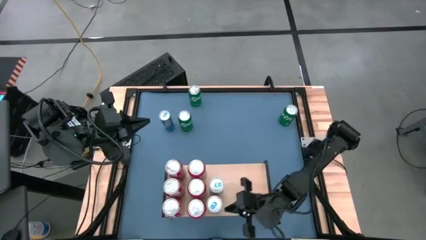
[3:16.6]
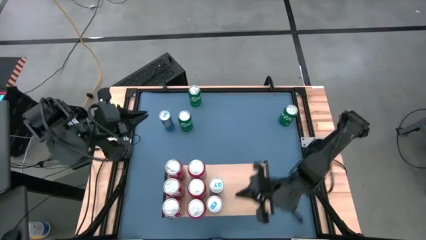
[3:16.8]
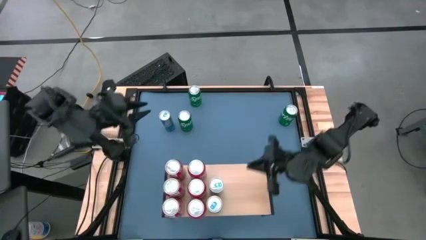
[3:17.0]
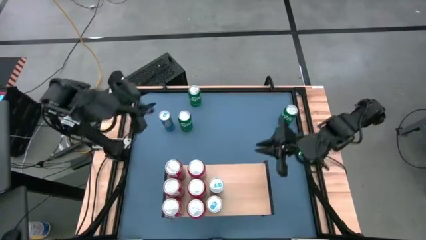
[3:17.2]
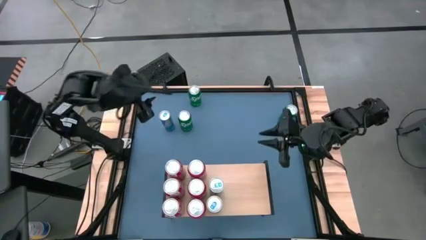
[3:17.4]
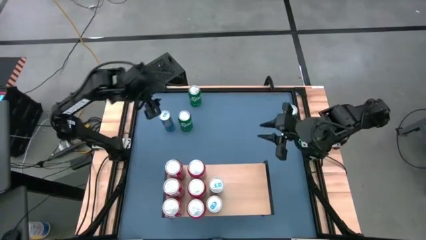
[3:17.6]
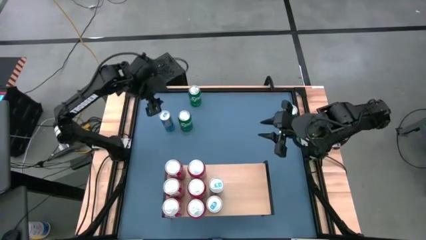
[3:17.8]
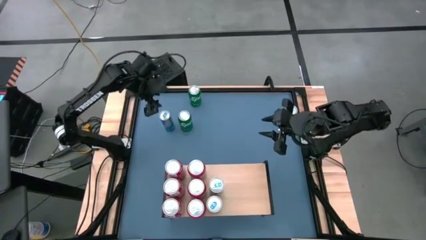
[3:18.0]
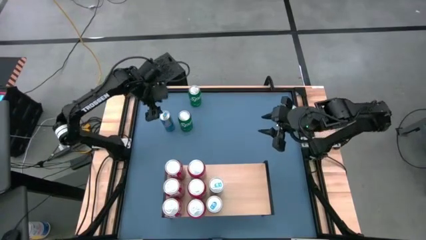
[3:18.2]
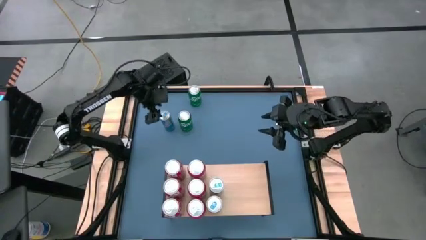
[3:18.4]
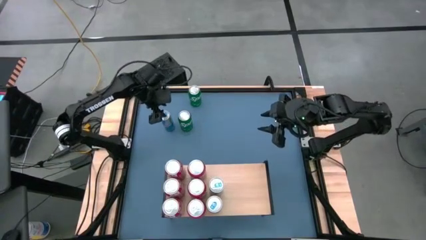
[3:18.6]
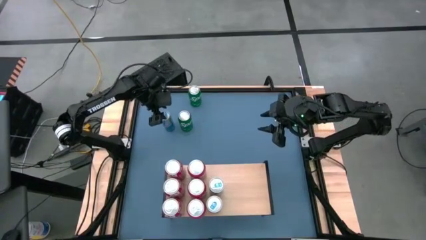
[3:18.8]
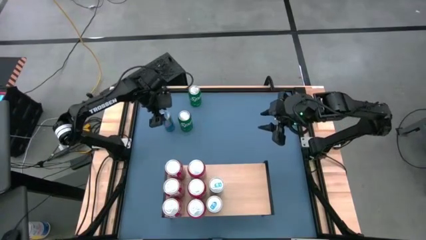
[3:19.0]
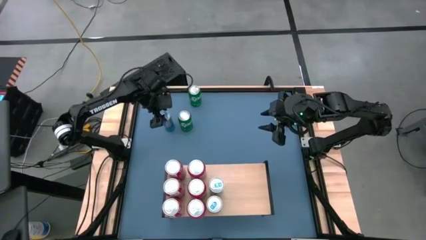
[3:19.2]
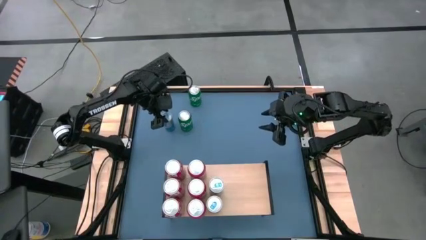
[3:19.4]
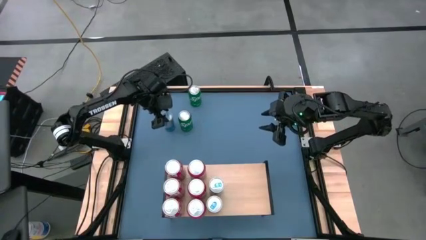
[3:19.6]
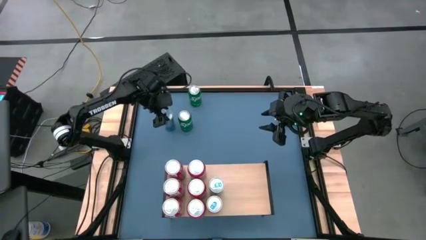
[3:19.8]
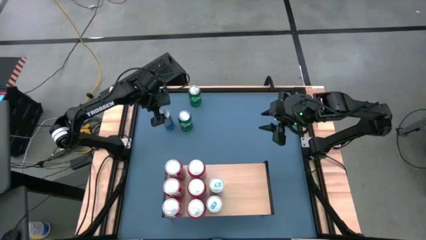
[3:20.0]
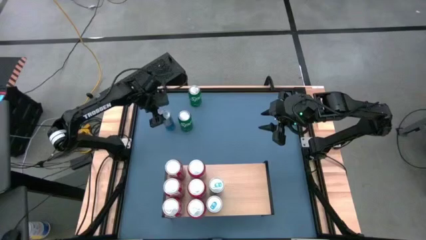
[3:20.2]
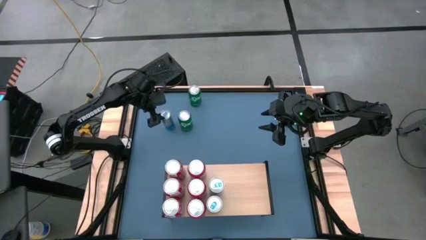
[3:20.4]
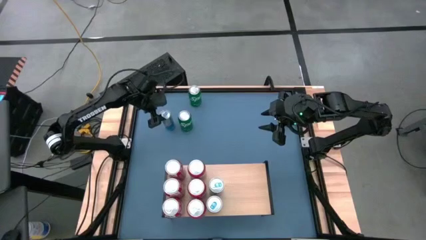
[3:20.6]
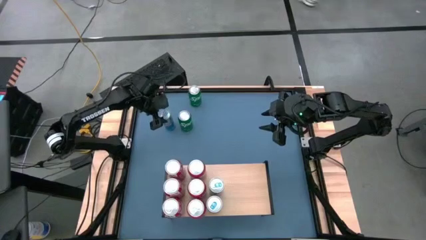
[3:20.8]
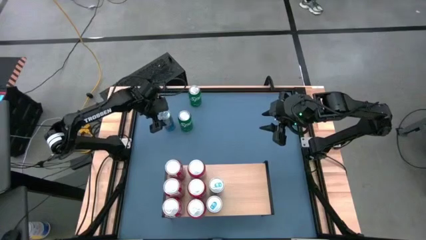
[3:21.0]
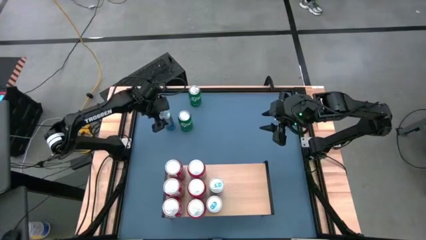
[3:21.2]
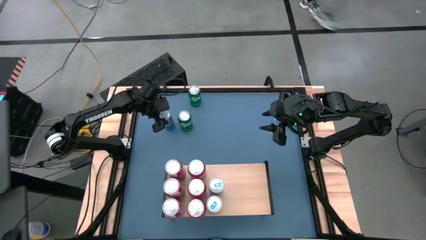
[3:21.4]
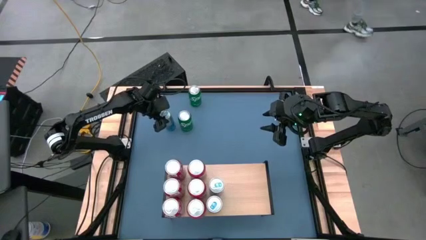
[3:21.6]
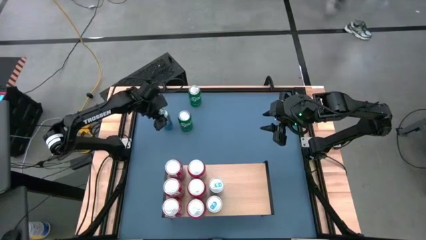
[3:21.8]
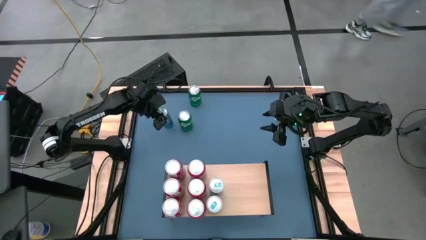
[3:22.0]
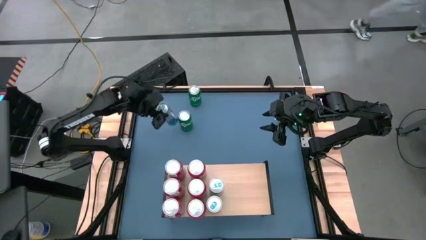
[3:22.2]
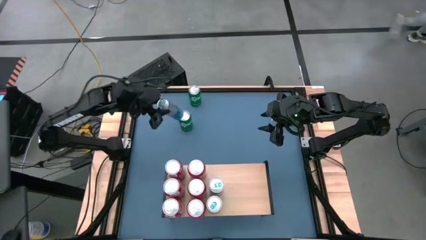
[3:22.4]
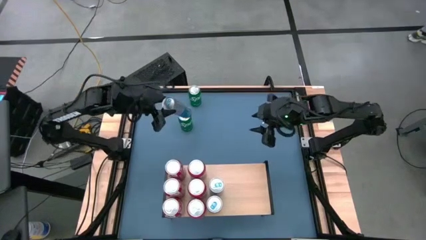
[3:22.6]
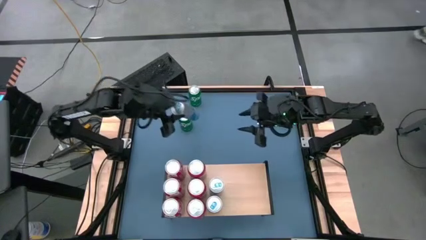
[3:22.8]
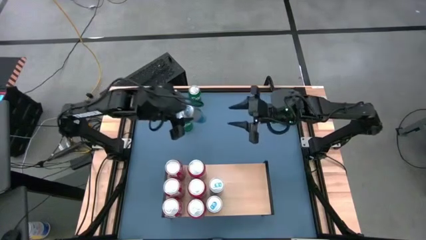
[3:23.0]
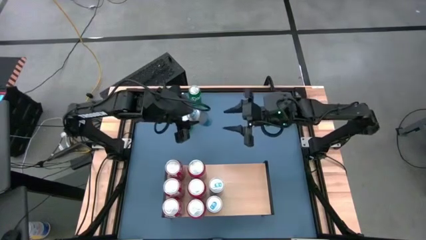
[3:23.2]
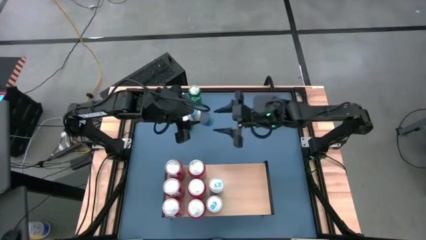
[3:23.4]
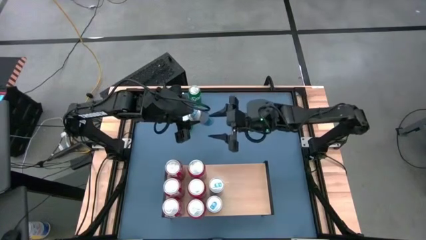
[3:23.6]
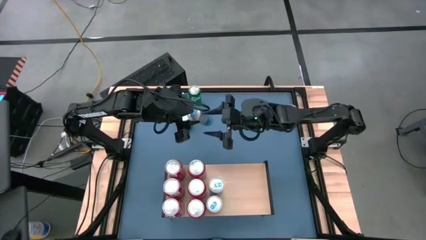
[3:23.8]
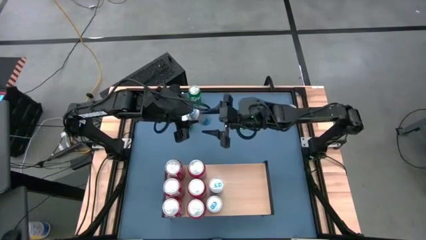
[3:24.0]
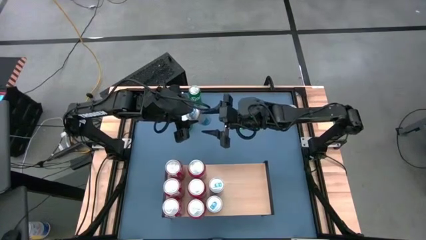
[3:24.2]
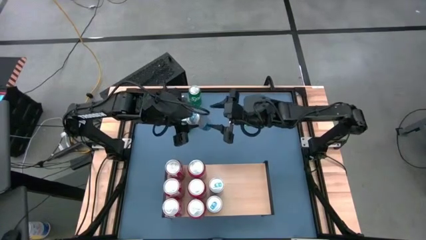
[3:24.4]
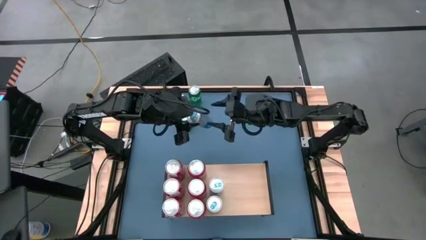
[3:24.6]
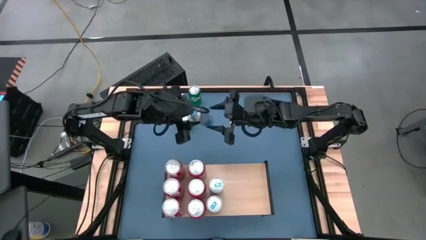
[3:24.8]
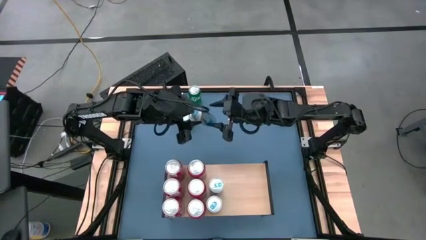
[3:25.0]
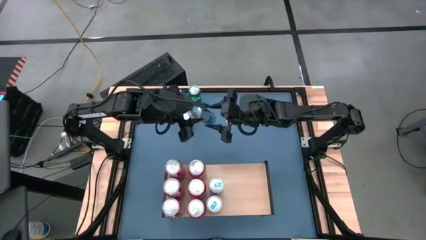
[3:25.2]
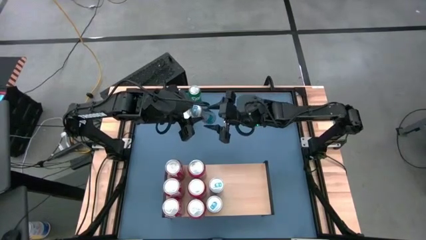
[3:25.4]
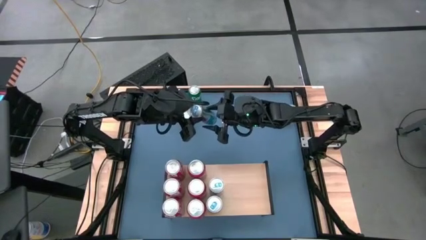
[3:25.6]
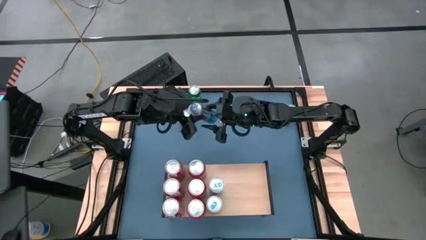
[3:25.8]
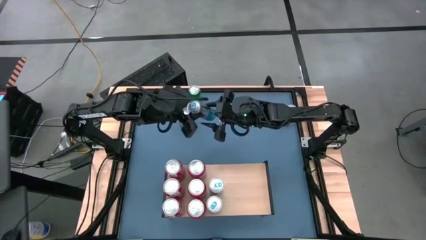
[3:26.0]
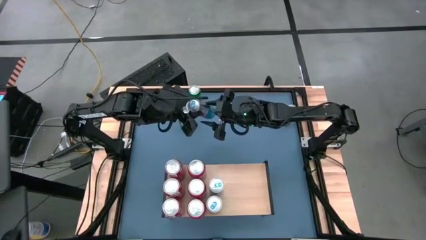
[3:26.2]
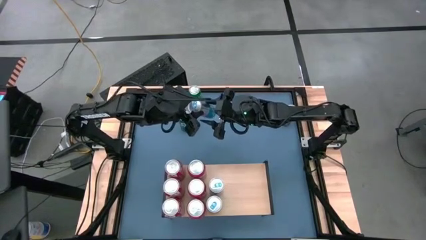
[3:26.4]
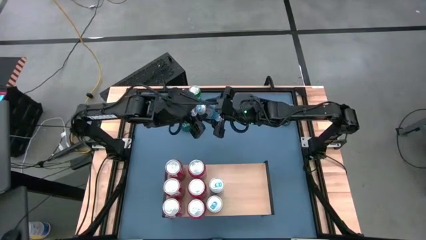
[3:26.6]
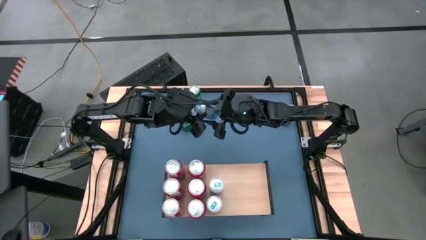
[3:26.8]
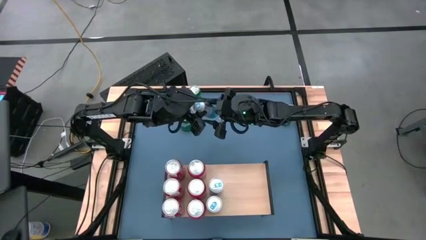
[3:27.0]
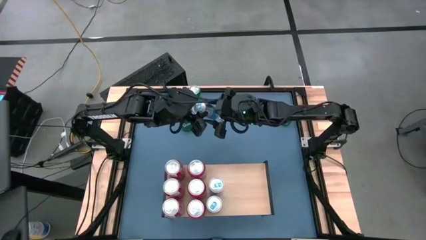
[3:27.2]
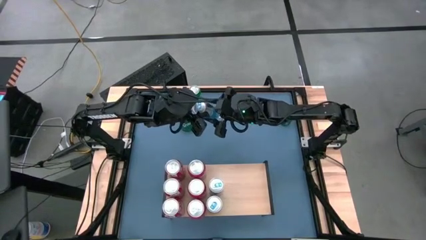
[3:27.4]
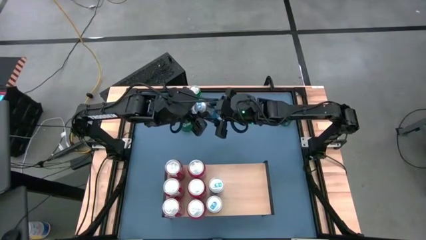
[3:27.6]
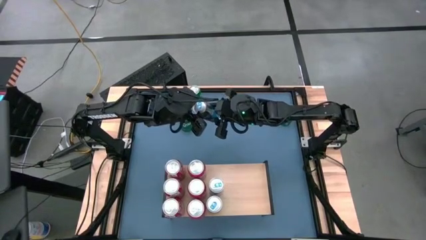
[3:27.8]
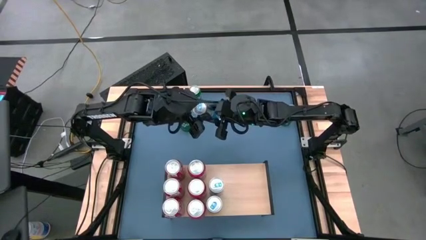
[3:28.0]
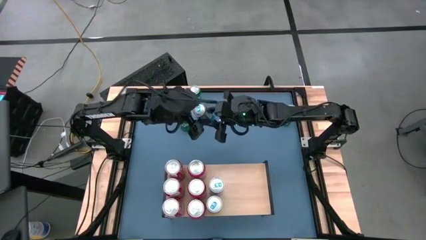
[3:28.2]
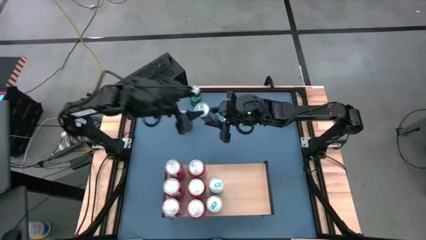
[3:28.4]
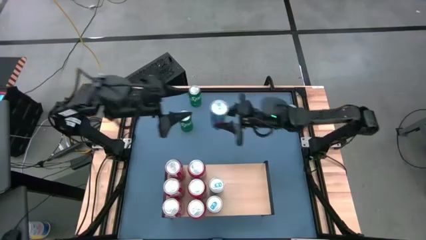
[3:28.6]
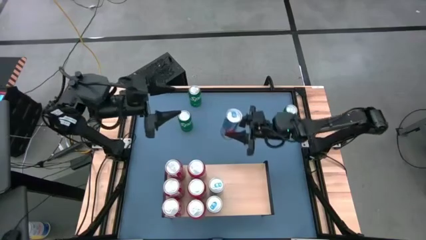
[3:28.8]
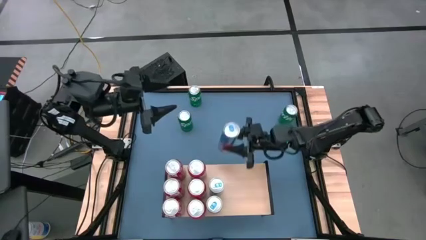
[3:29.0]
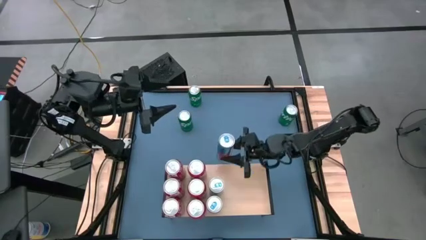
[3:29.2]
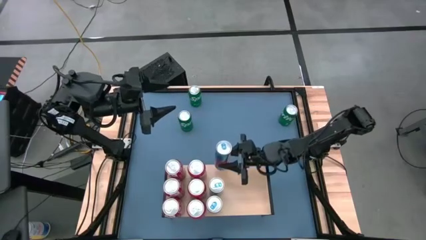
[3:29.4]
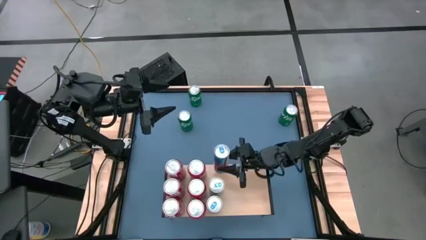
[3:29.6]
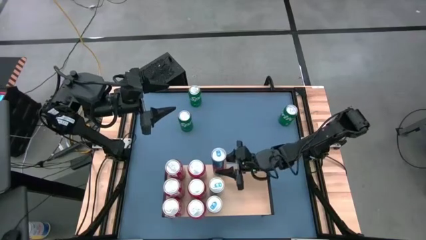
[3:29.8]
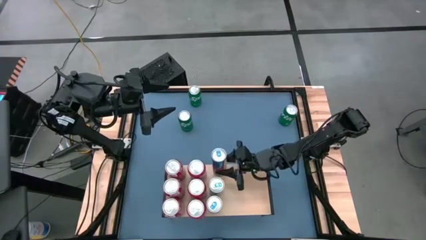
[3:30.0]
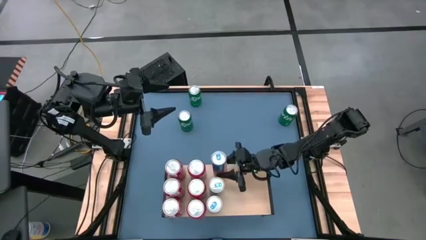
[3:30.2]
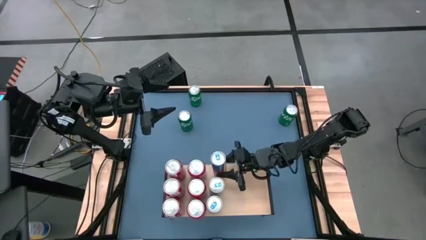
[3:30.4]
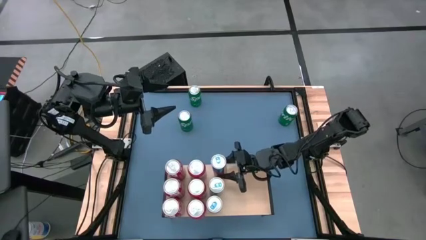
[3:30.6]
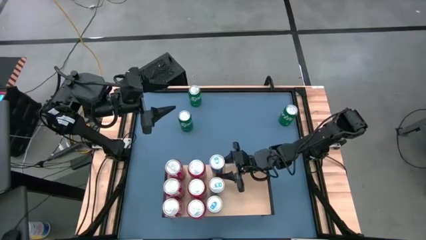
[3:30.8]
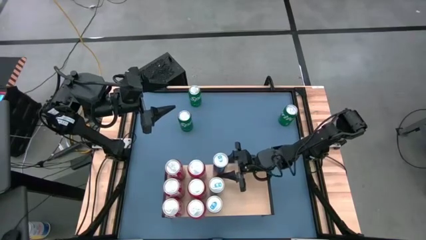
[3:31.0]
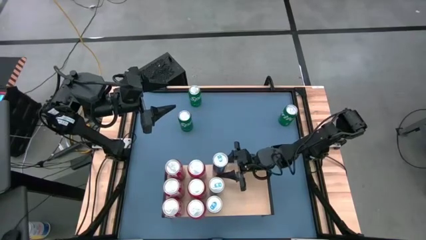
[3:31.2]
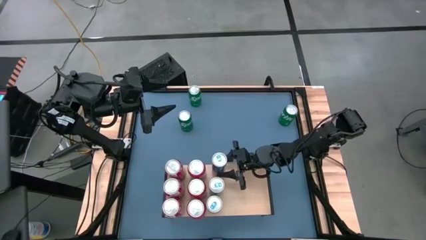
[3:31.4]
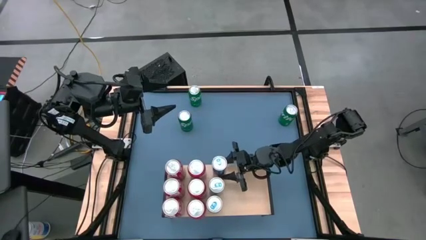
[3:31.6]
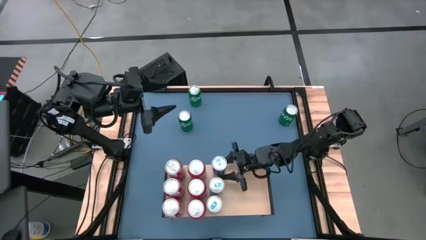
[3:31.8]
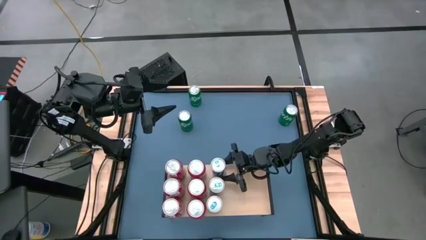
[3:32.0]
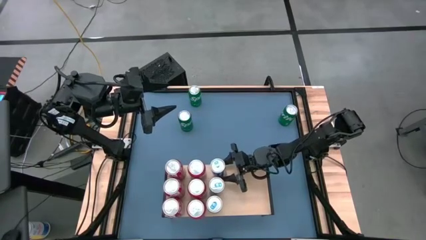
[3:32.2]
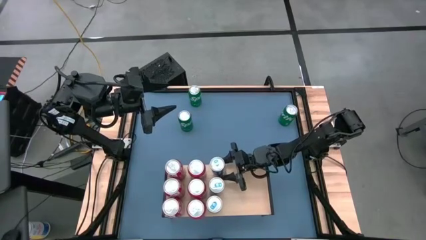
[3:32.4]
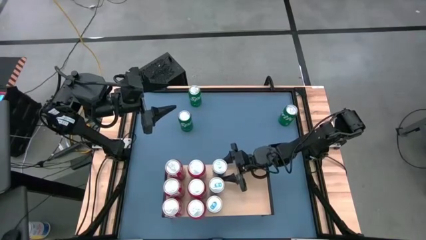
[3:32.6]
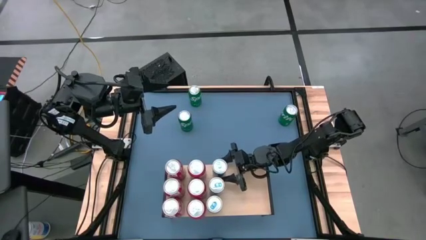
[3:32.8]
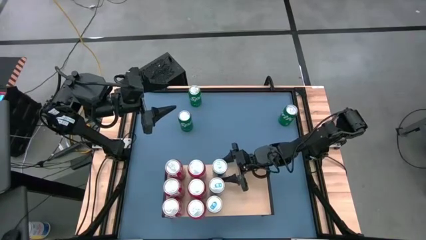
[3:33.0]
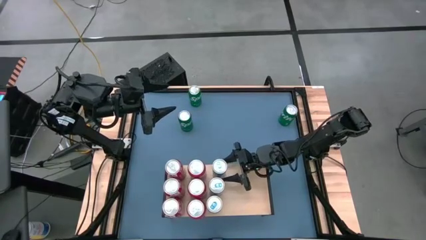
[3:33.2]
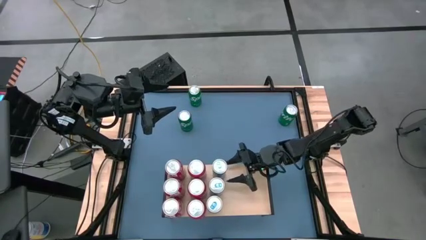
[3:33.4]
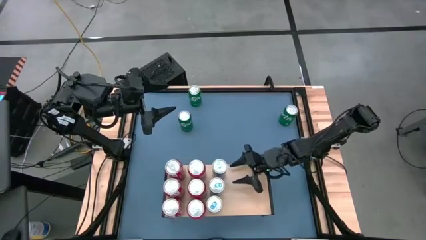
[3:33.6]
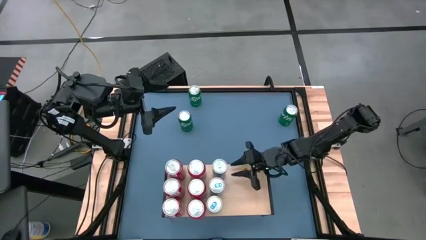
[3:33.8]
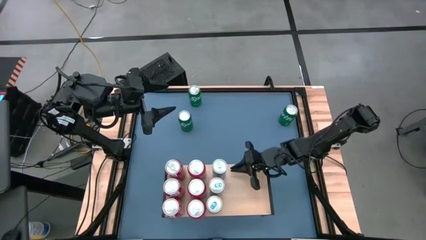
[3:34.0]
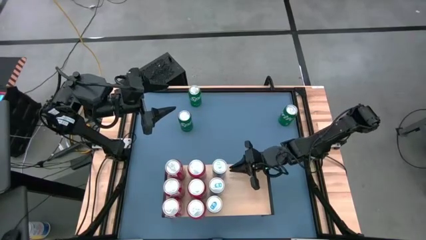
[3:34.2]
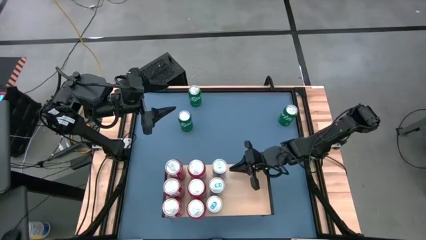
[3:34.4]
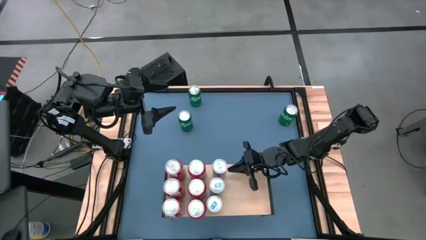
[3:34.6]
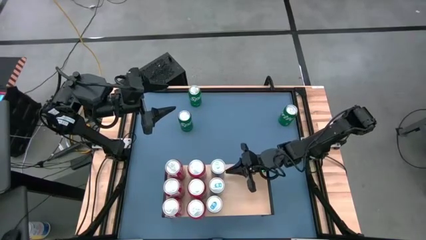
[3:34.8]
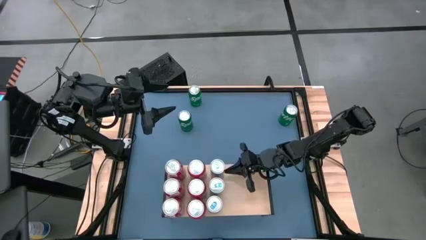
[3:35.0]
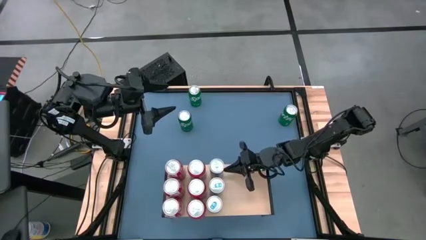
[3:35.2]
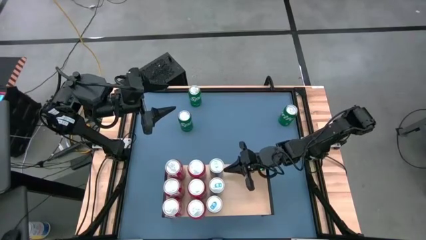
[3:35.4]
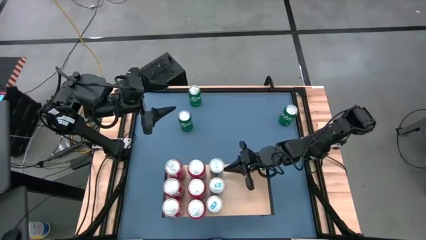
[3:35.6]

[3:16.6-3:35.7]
Task: Place canned beverage on shelf
Put the blue soda can on the shelf aligned with the other blue soda cans
